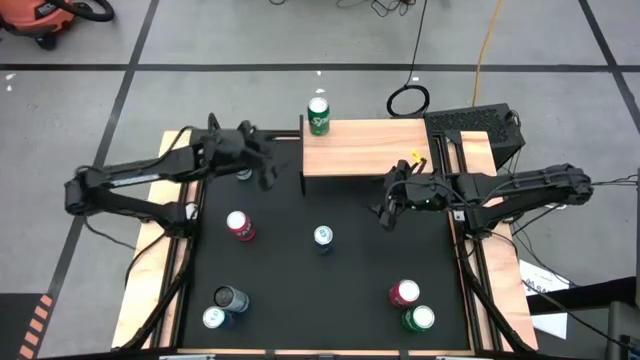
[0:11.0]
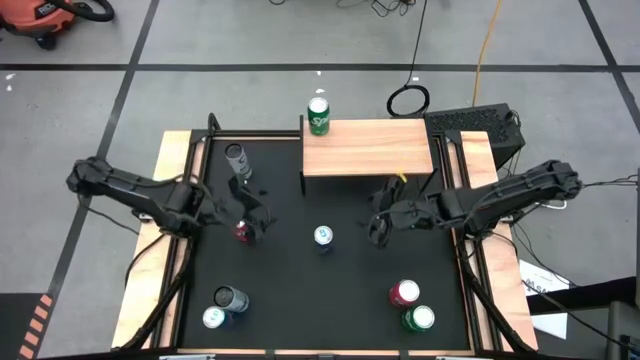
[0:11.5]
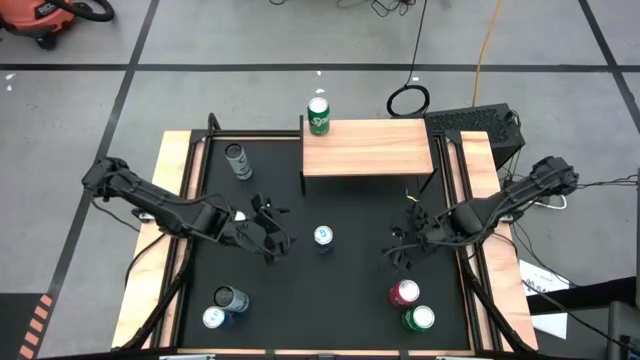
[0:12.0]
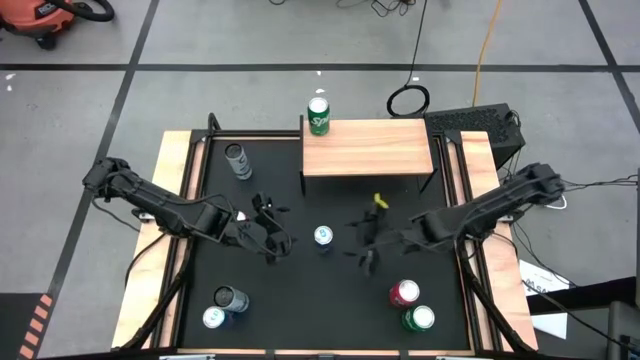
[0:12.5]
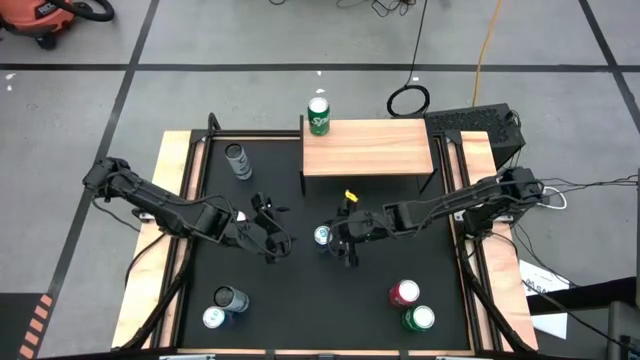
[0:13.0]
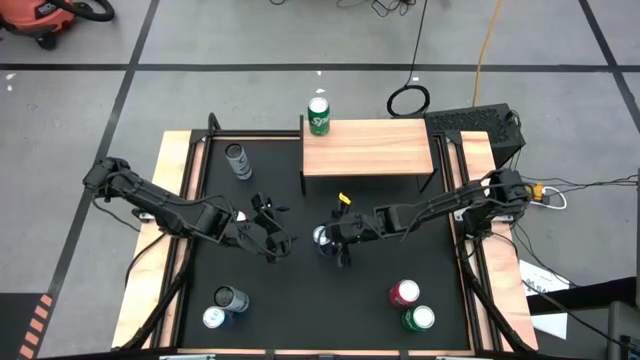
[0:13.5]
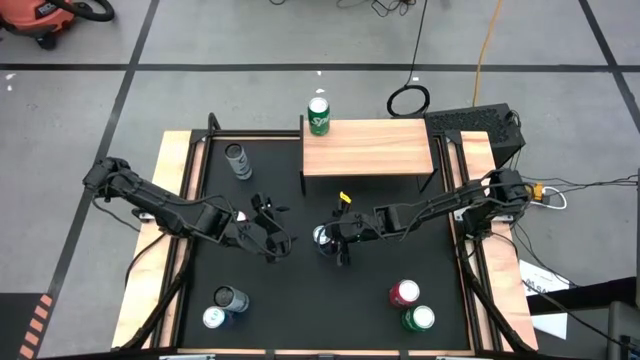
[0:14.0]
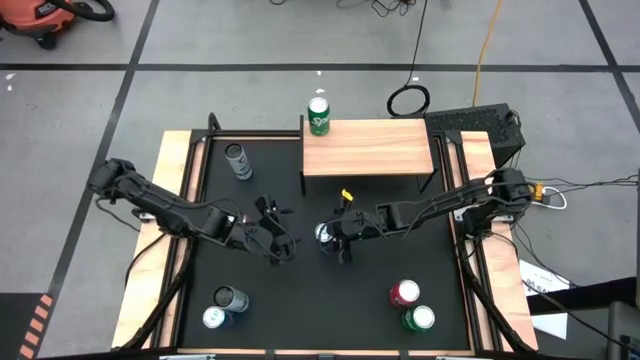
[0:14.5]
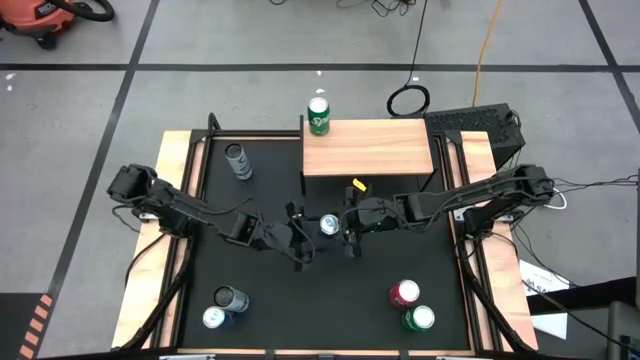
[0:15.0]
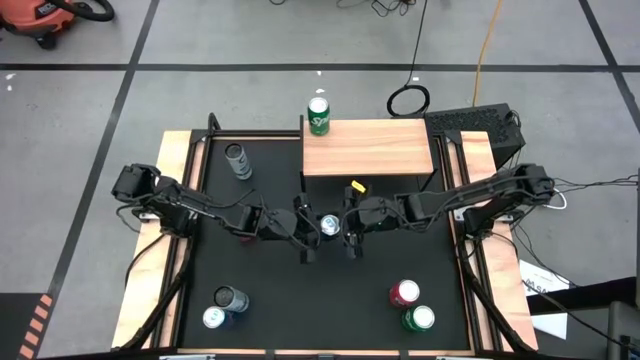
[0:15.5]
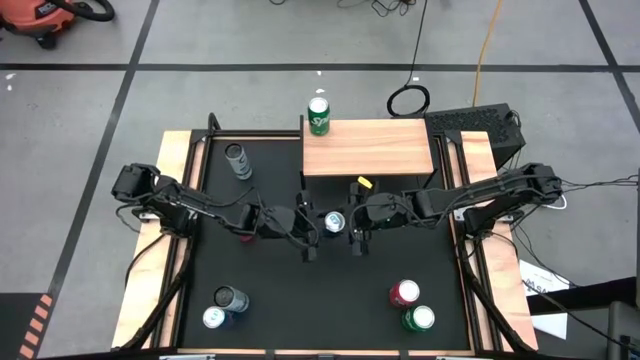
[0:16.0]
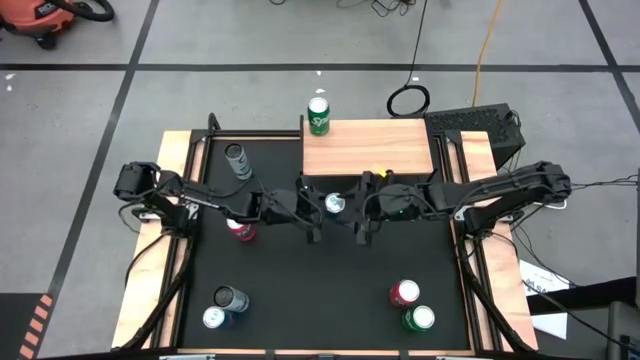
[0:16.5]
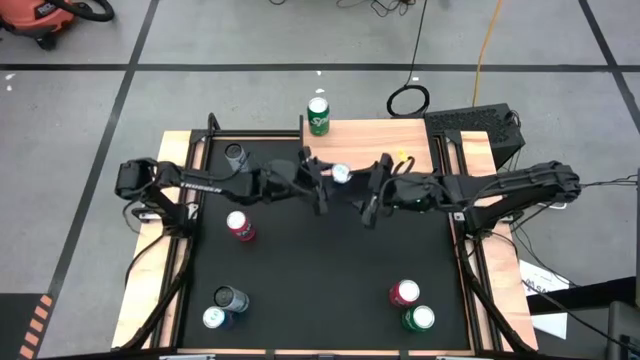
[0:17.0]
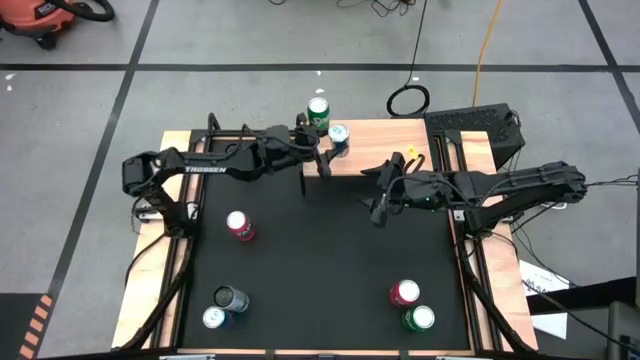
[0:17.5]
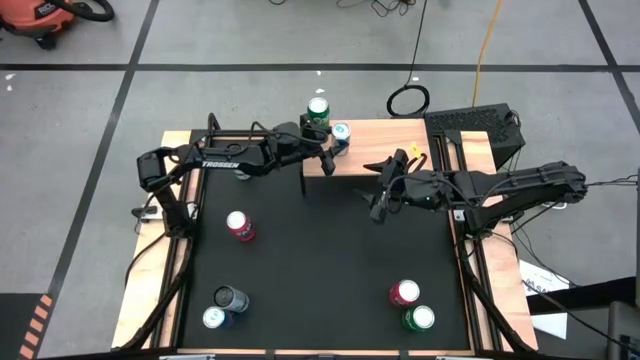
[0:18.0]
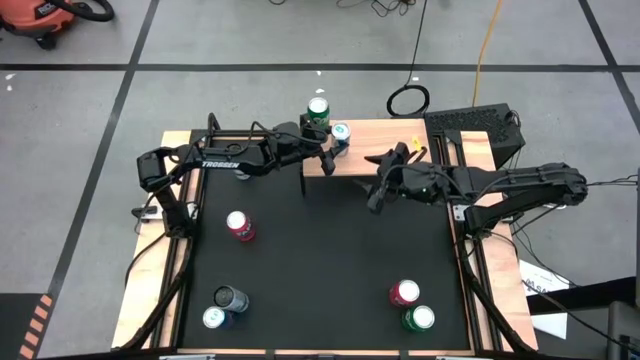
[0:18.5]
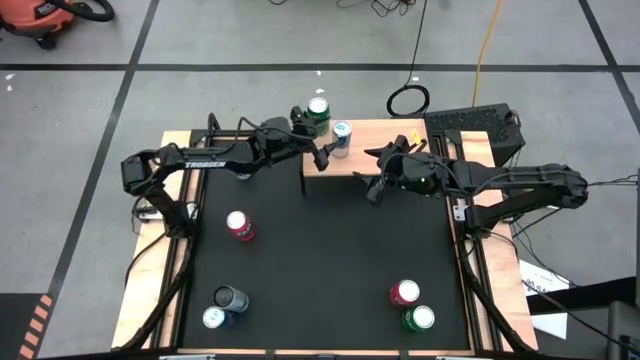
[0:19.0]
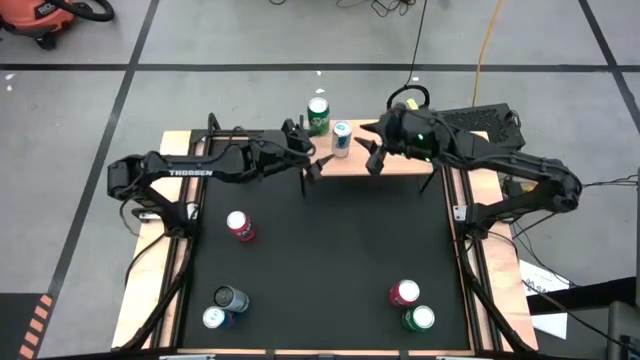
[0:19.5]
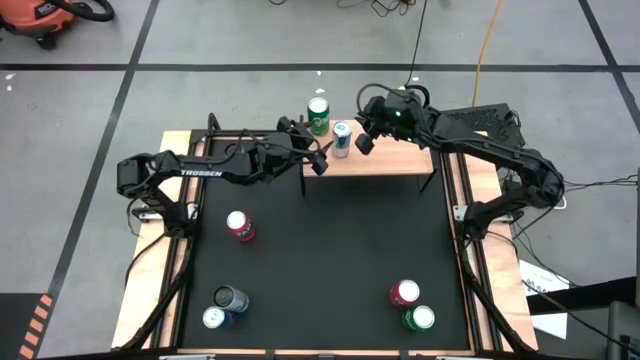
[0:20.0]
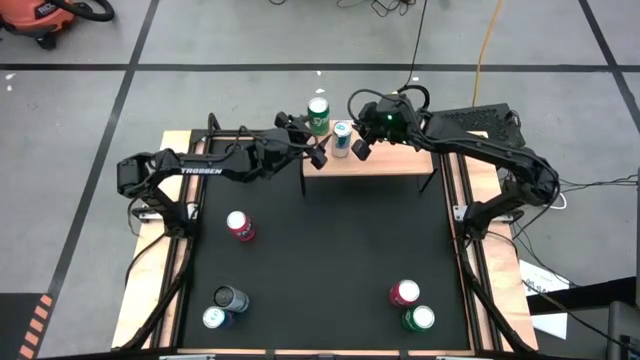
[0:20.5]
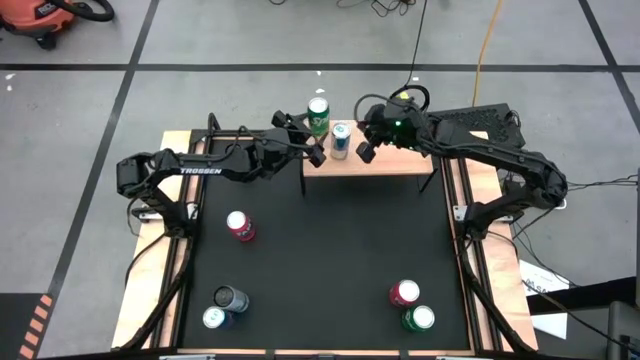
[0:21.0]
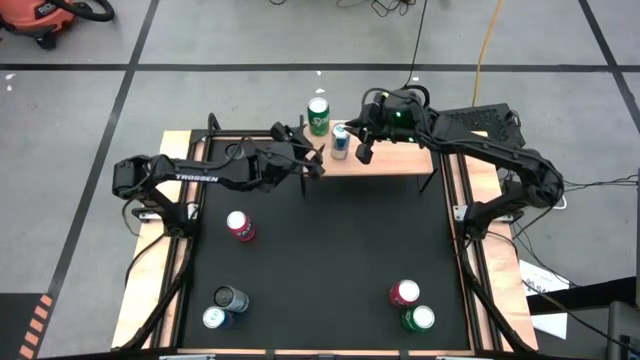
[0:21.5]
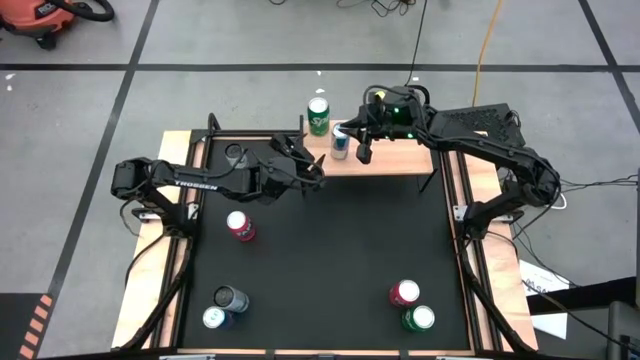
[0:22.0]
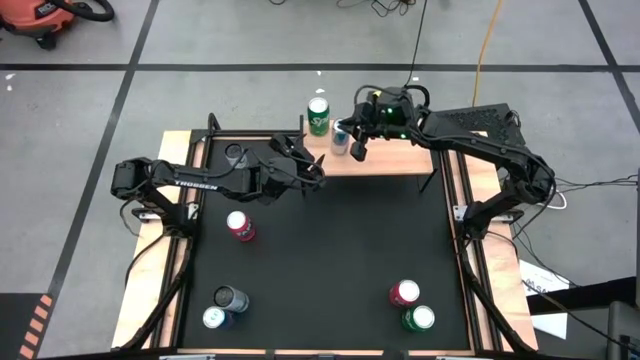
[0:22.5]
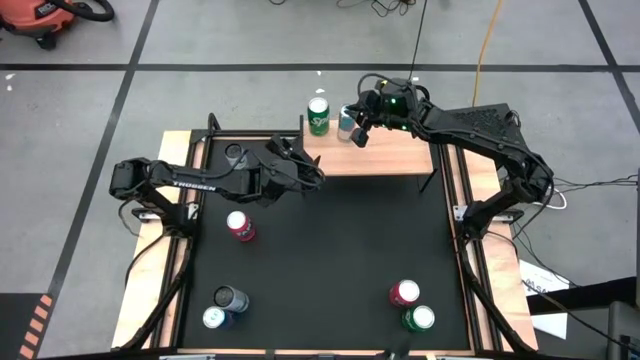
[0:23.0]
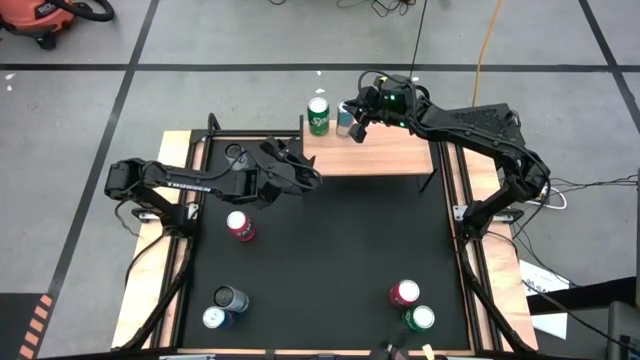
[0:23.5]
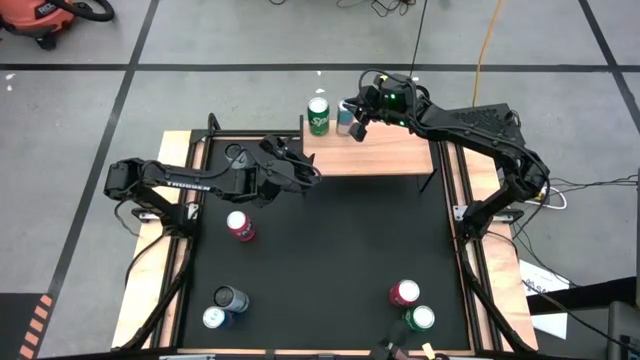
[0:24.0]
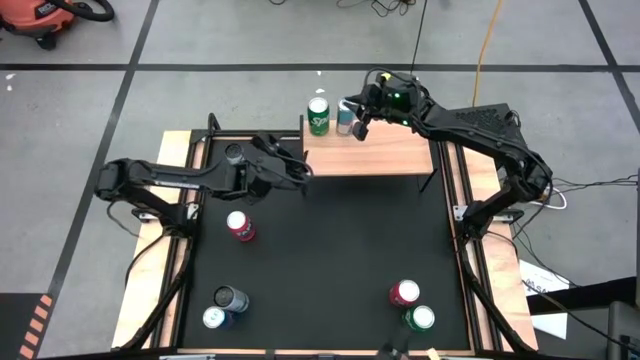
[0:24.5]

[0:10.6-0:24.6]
Task: Place canned beverage on shelf
Put the top blue soda can on the shelf

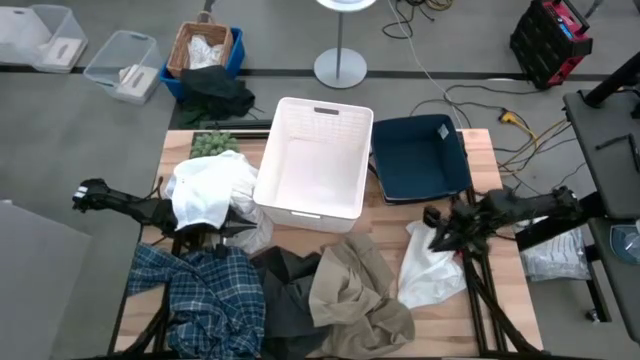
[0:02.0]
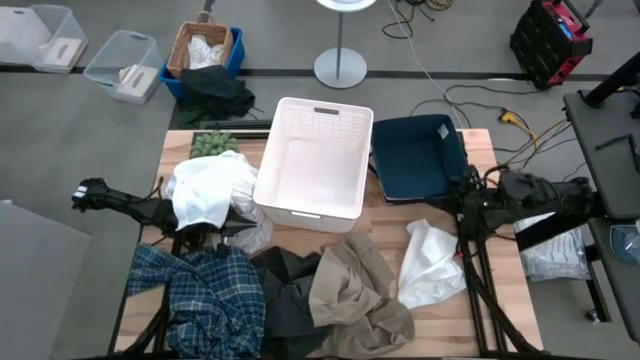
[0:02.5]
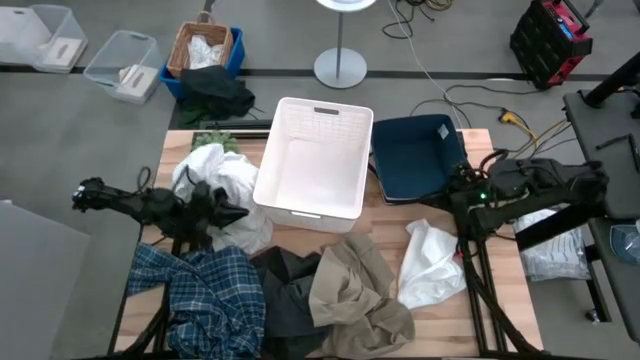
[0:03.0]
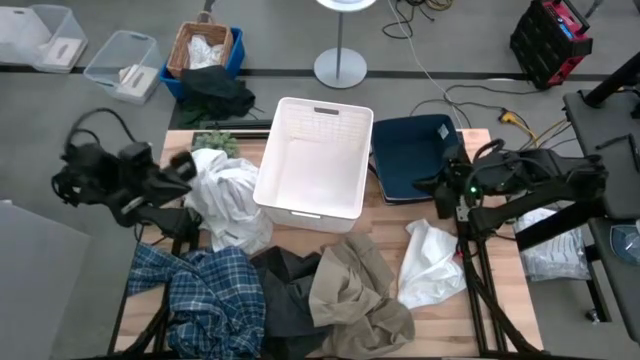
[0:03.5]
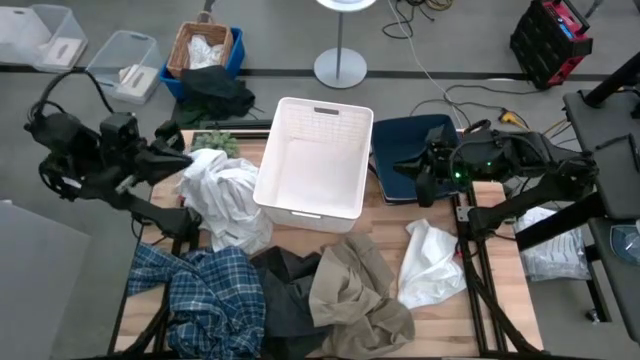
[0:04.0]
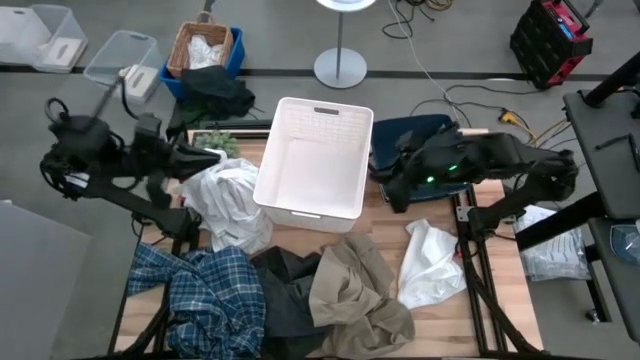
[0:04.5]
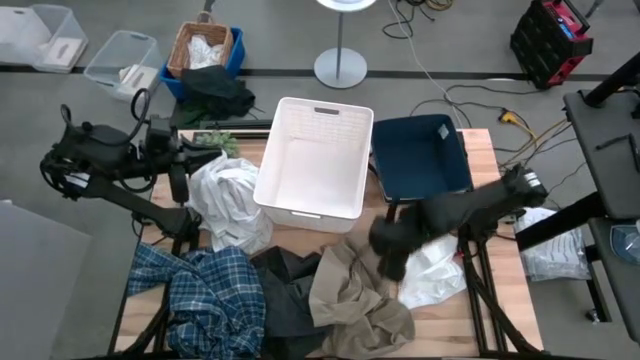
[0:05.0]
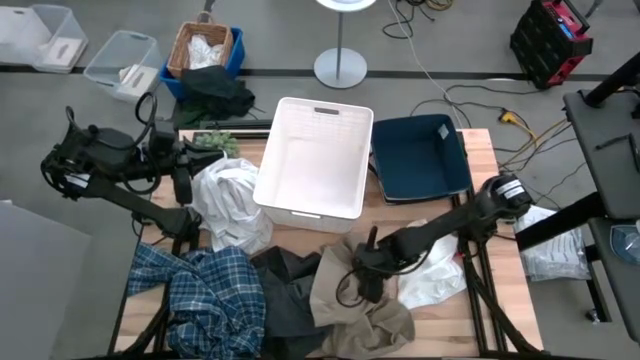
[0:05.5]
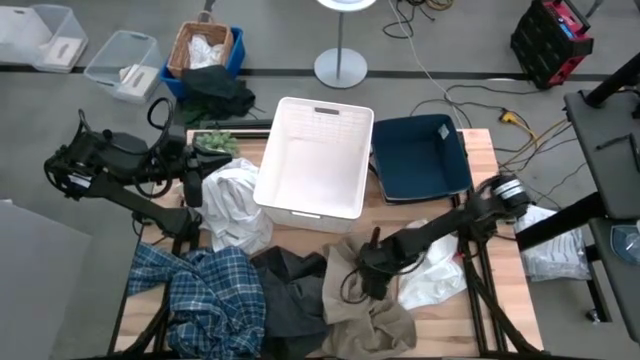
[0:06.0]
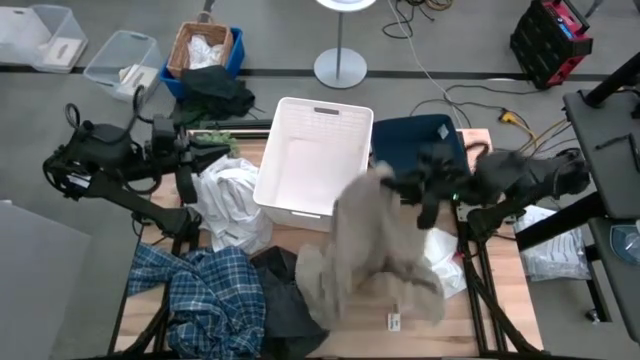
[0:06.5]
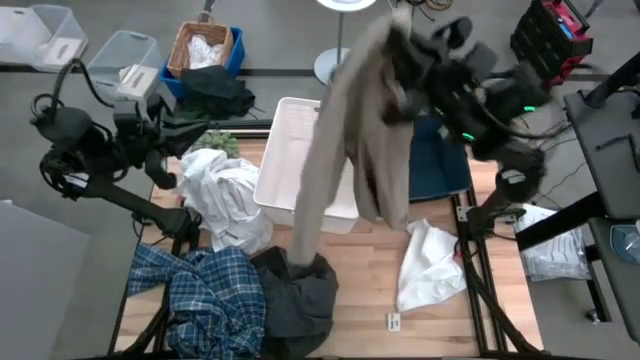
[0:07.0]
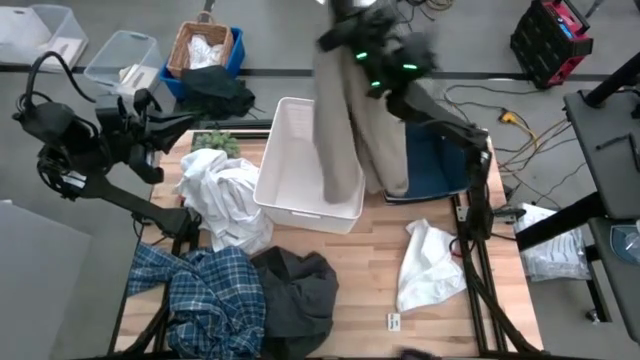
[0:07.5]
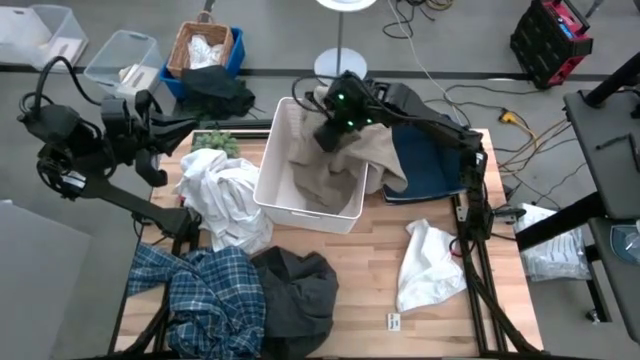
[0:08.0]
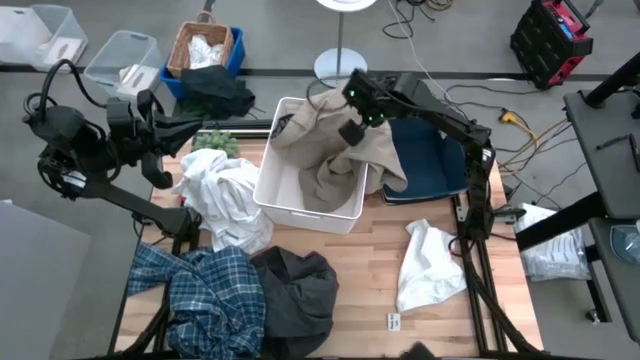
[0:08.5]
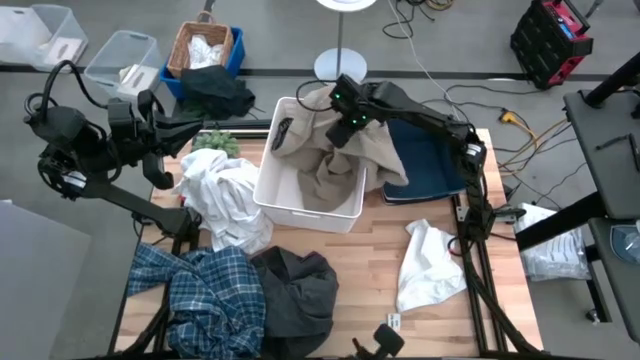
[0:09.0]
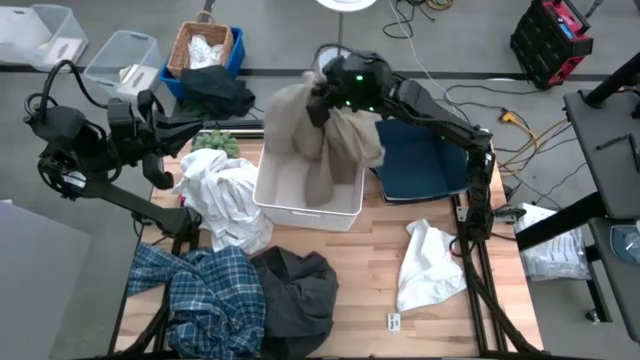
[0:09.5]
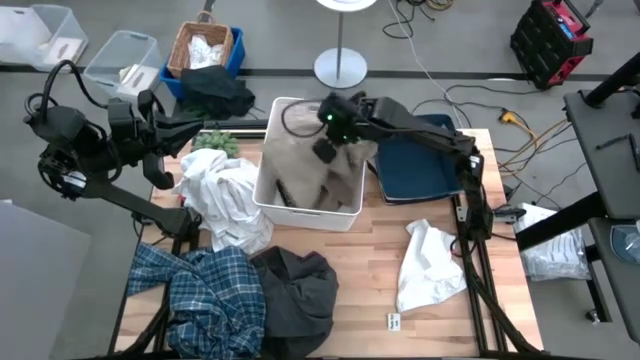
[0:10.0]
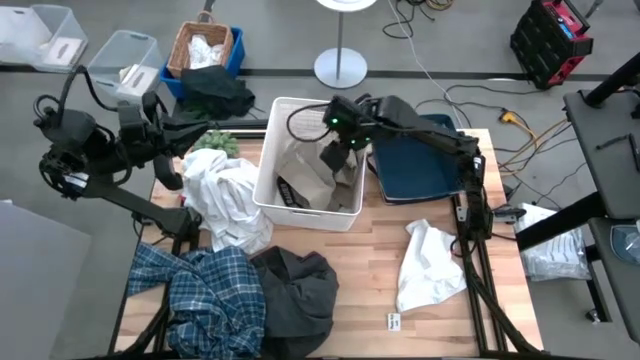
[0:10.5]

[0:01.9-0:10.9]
Task: Sort clothes
Put the brown pants into the white bin
